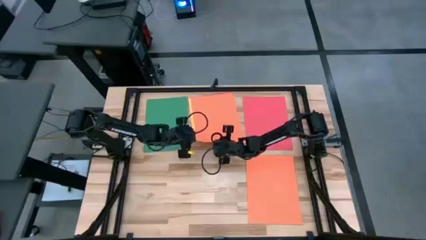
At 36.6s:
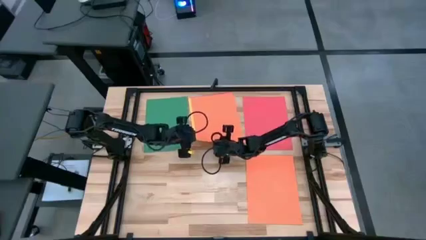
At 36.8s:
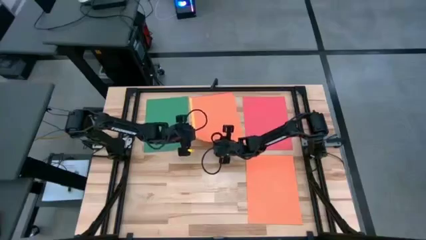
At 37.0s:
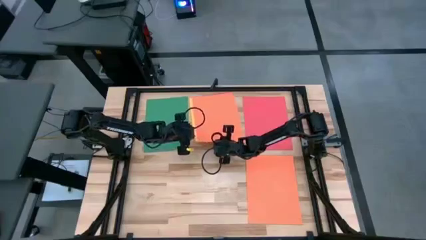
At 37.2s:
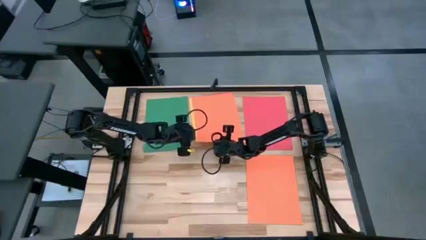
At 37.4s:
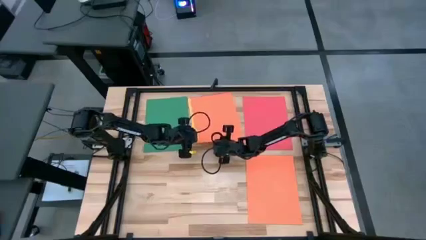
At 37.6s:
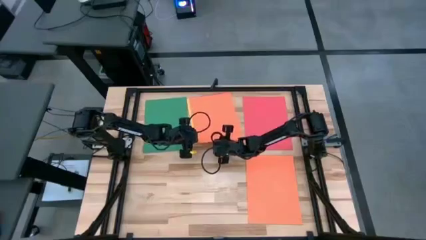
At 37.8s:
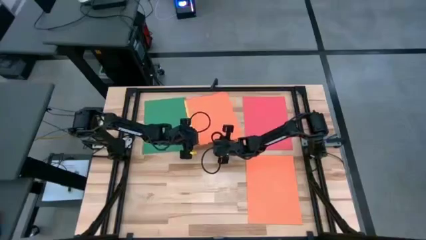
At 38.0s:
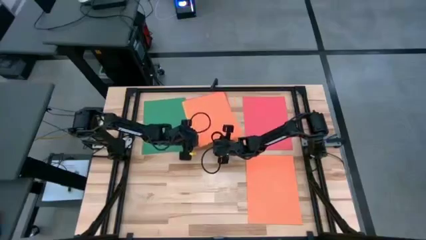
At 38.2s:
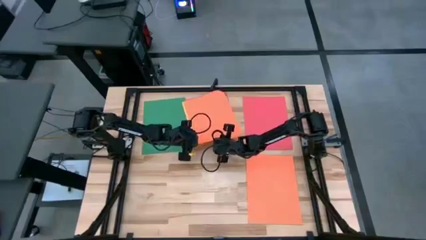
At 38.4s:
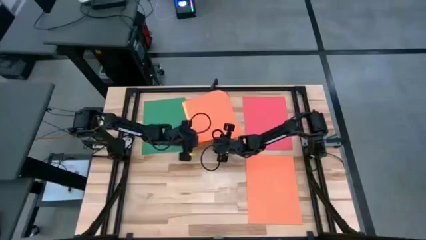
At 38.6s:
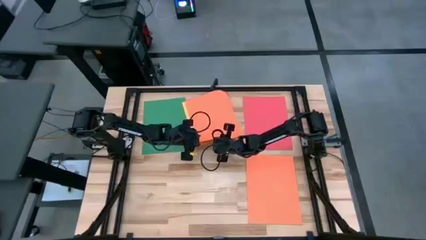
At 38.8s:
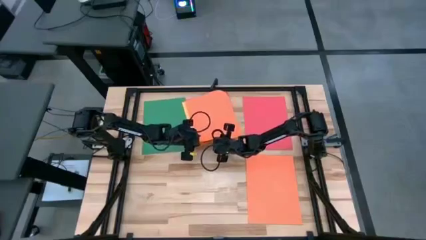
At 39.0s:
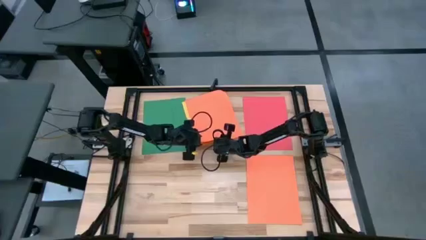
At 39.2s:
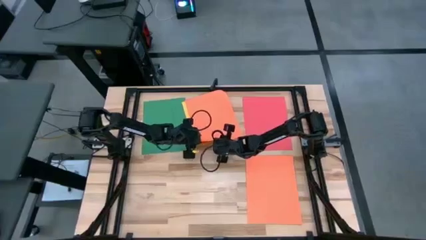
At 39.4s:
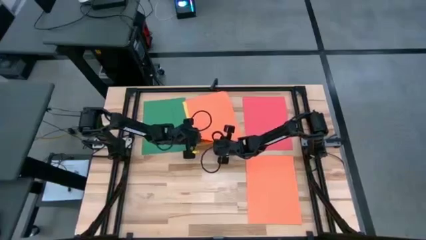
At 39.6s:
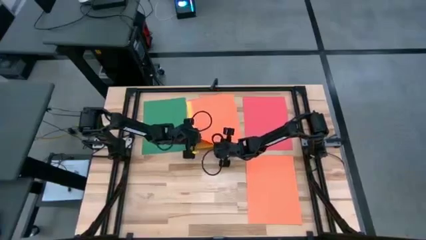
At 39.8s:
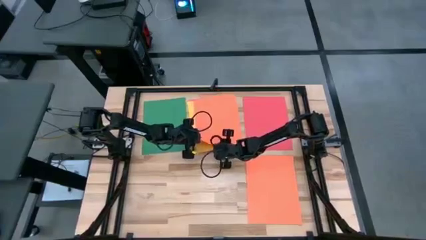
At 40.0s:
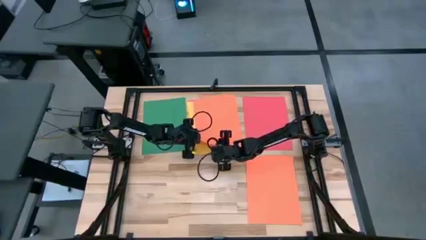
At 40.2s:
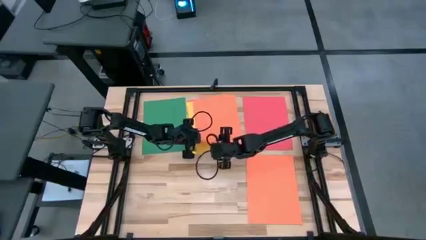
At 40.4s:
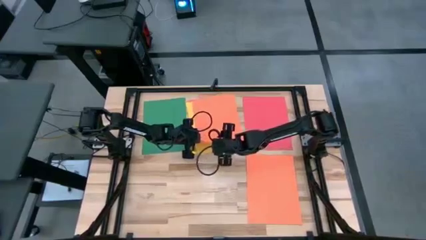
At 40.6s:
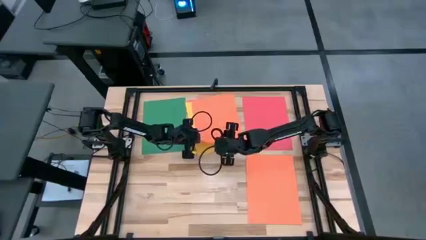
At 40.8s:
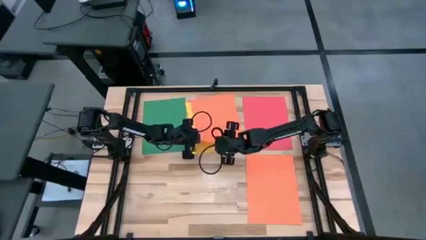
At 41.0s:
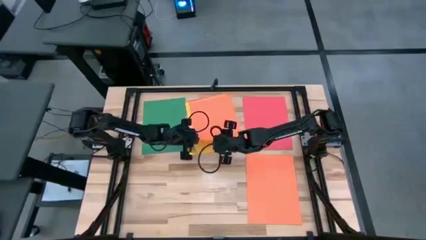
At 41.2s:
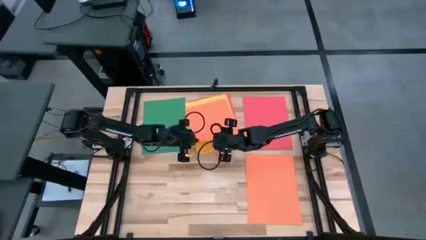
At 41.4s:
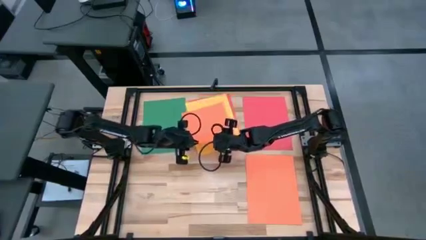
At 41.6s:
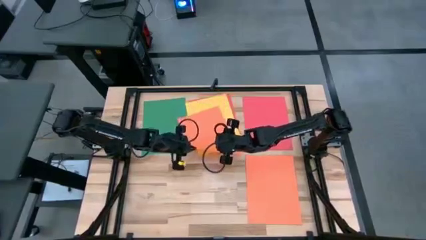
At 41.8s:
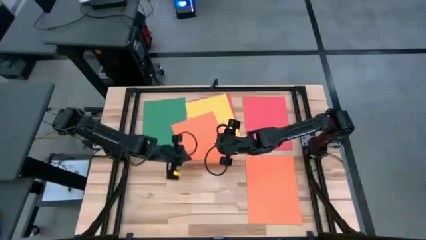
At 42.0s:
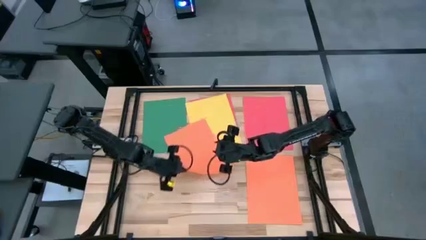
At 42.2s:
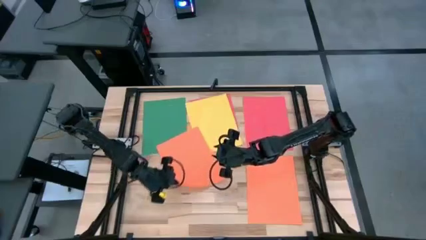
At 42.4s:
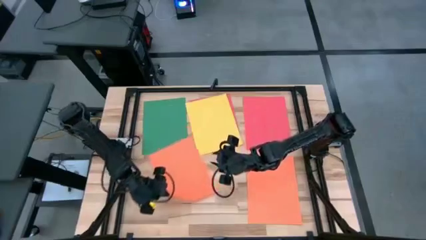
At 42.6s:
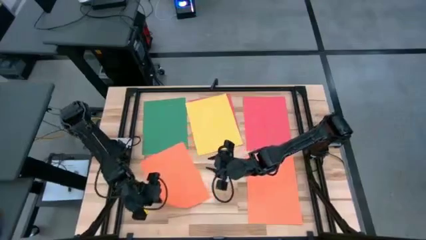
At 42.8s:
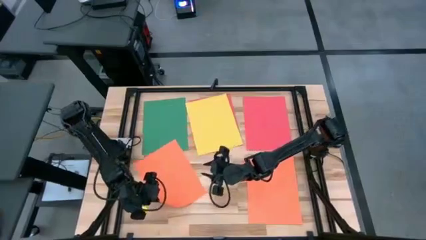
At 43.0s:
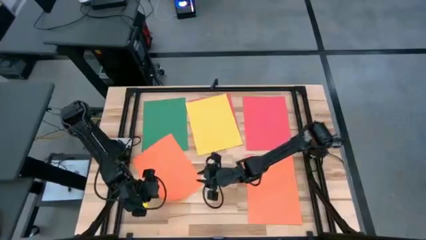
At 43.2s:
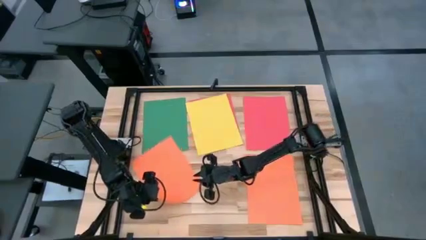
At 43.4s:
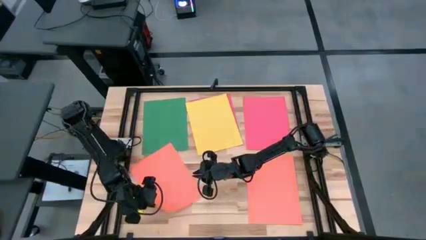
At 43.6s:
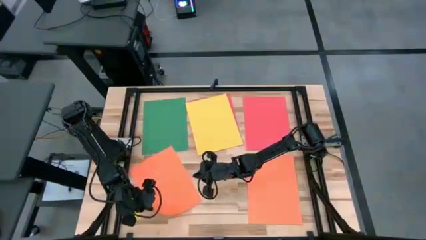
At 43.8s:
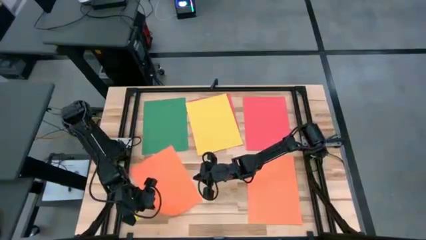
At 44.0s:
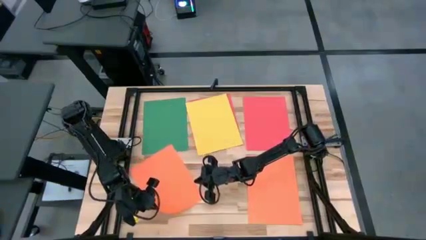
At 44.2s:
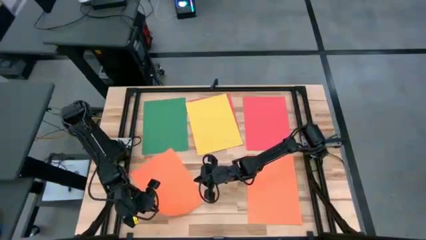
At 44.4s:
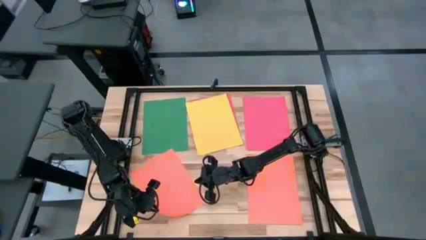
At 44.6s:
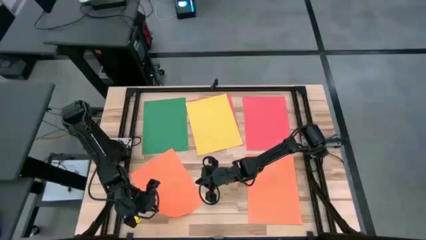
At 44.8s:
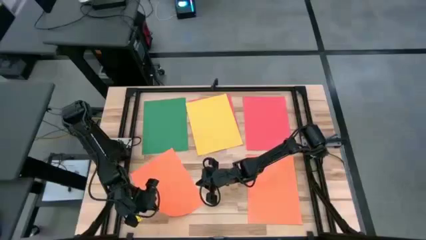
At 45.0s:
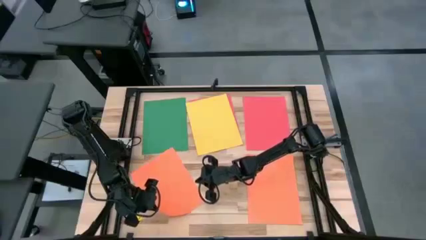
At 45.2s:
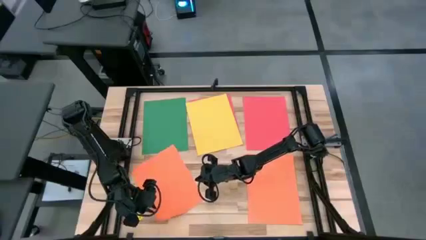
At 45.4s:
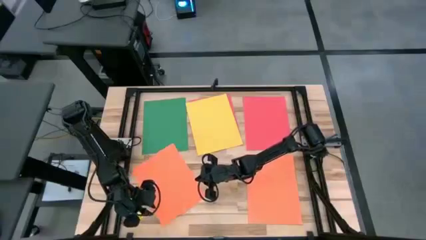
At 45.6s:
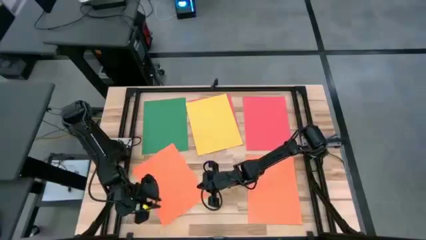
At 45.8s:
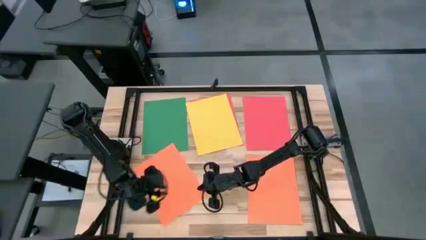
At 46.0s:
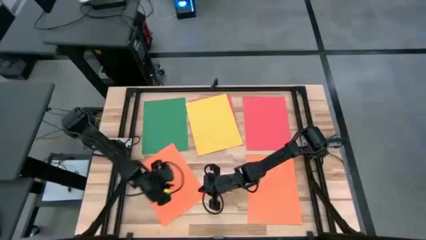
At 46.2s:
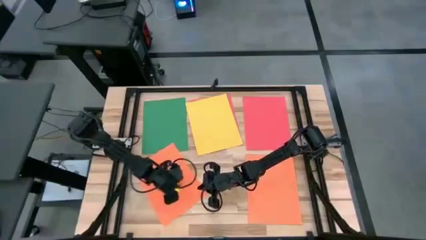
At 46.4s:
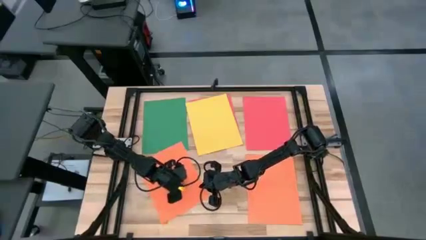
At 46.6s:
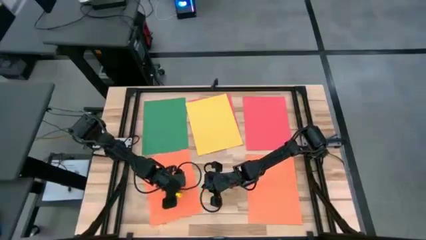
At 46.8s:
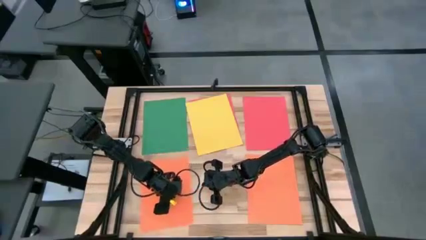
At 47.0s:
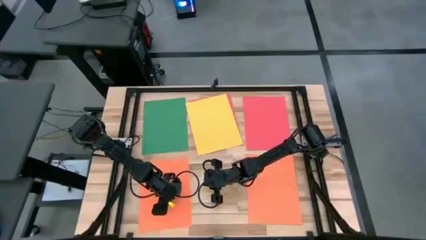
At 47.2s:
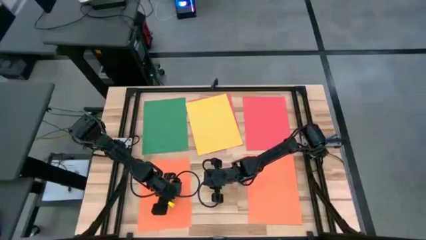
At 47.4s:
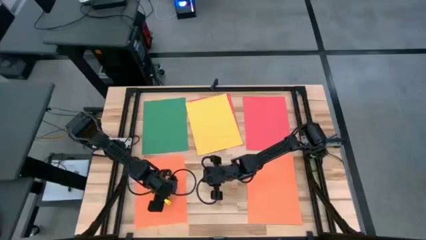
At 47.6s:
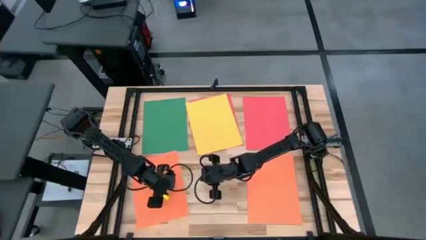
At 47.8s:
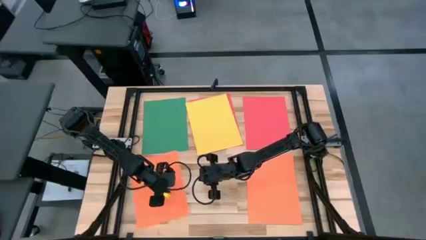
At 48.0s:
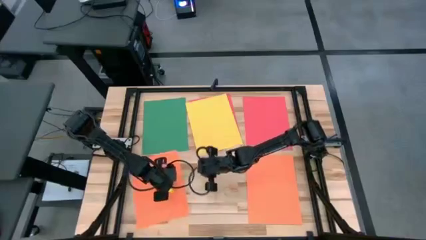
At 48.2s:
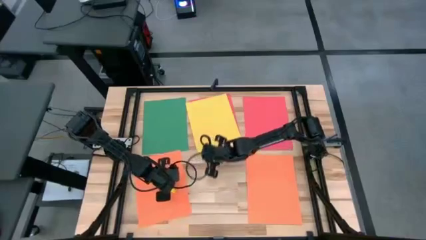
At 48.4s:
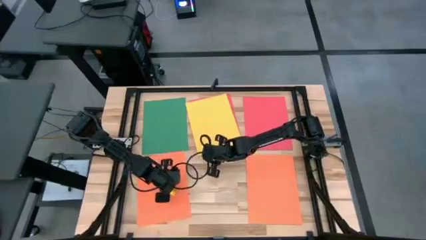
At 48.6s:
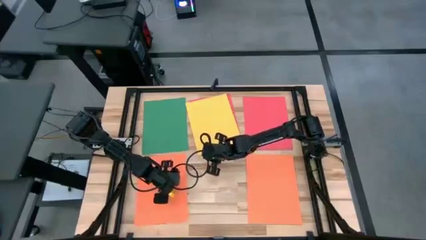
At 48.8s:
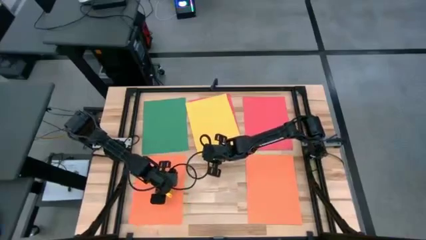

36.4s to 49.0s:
Task: Organize paper
Put the orange paper on the bottom left of the table
